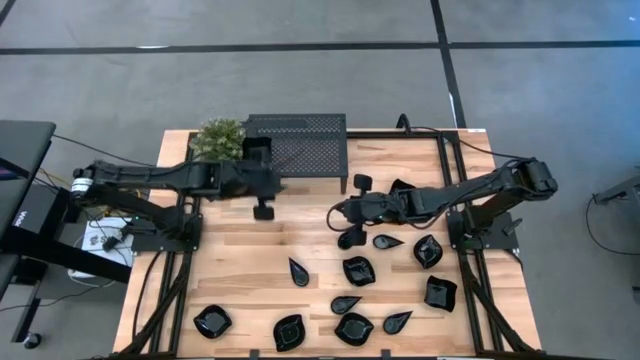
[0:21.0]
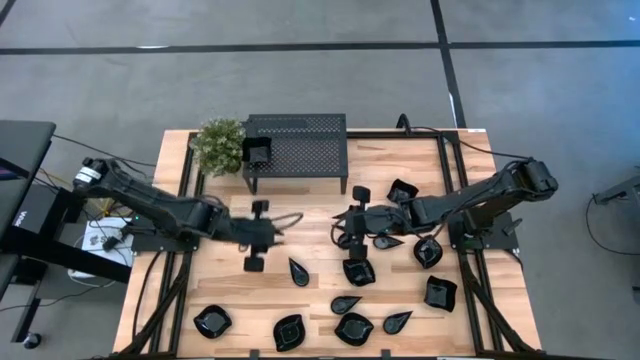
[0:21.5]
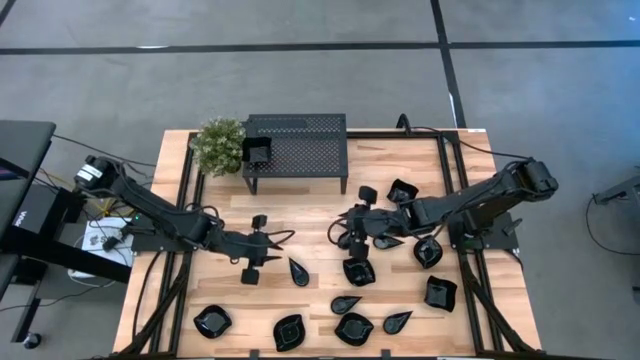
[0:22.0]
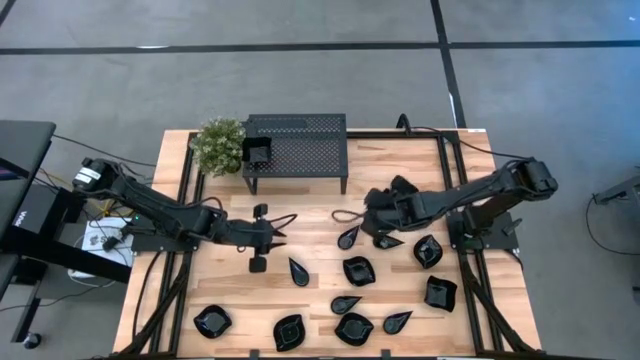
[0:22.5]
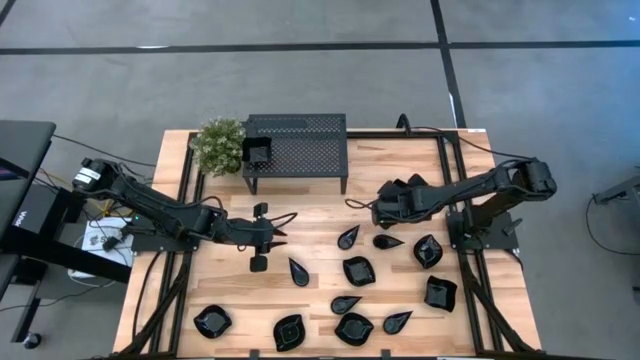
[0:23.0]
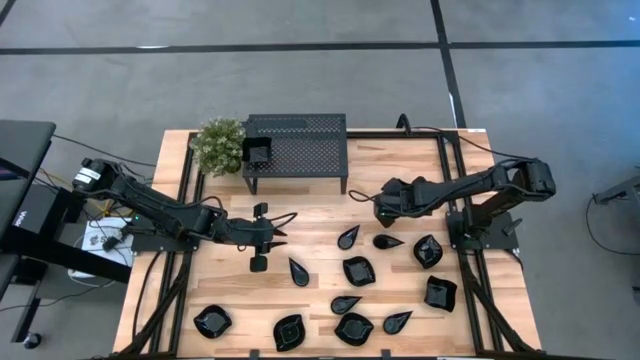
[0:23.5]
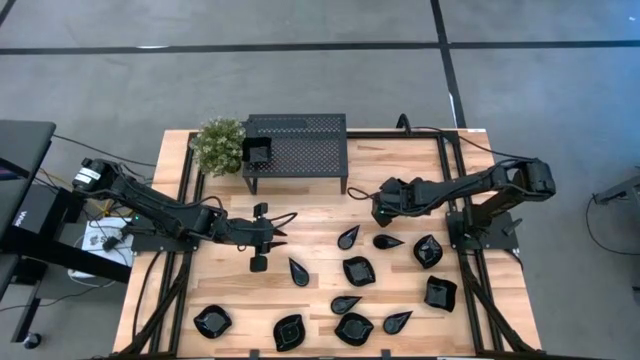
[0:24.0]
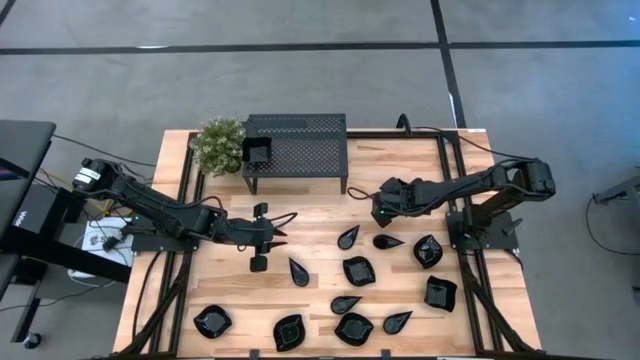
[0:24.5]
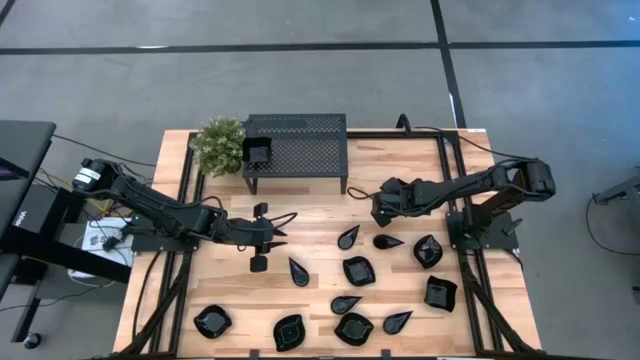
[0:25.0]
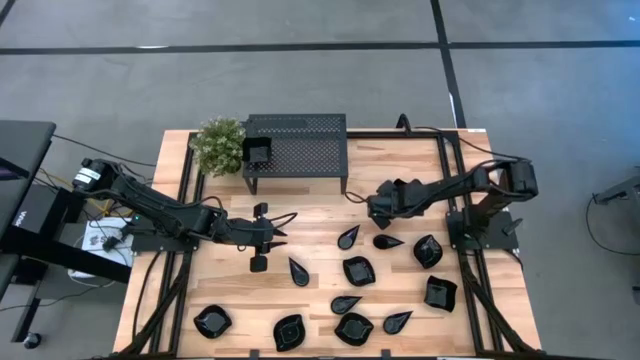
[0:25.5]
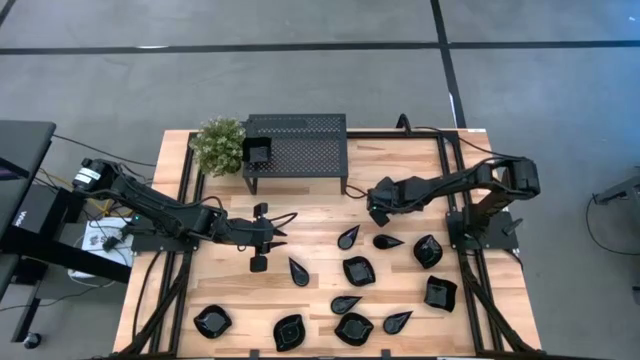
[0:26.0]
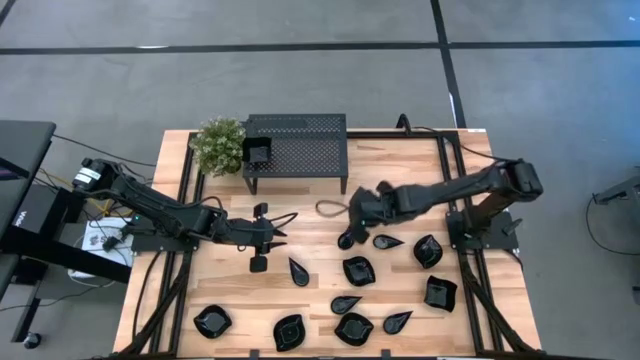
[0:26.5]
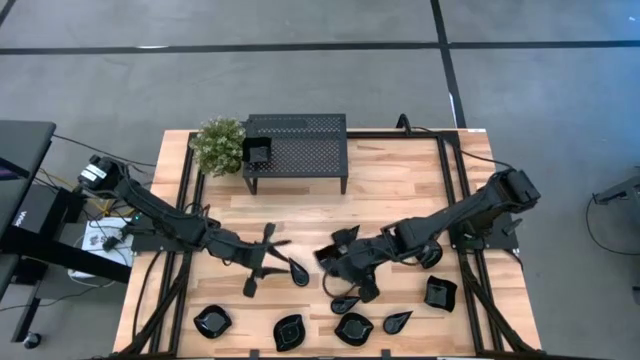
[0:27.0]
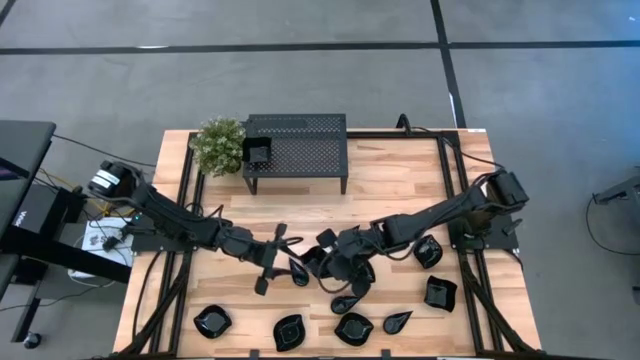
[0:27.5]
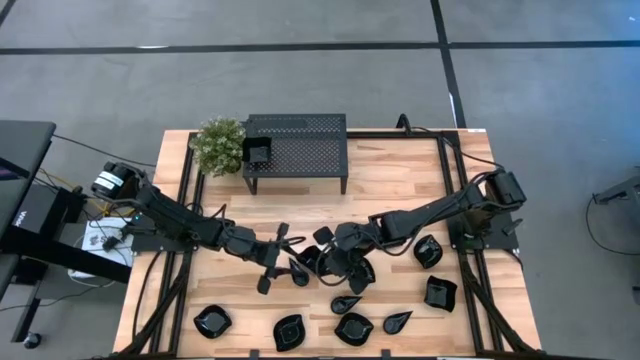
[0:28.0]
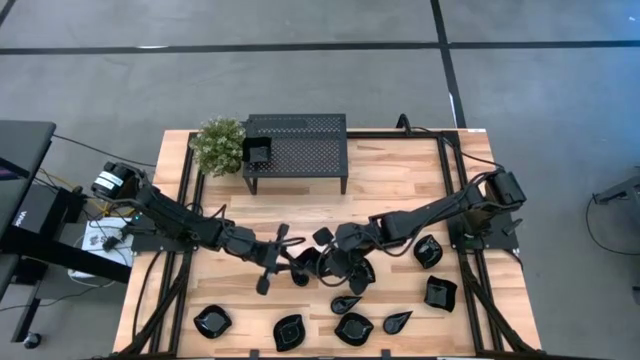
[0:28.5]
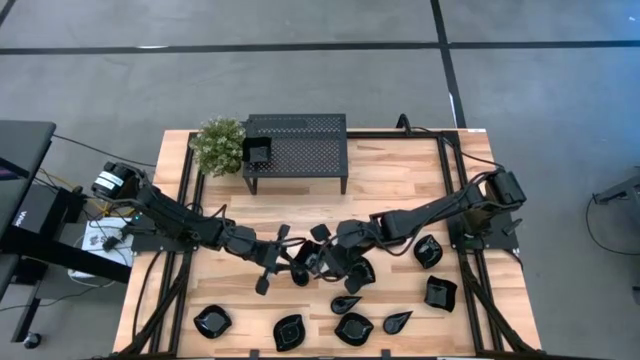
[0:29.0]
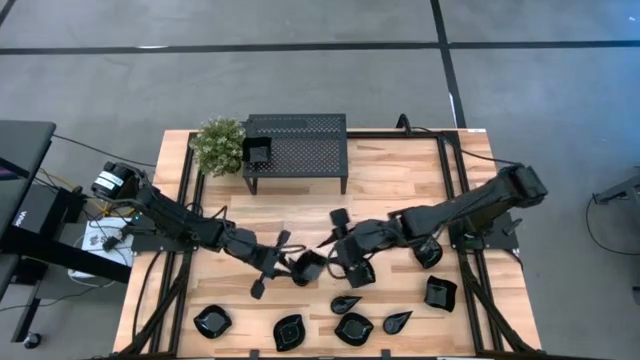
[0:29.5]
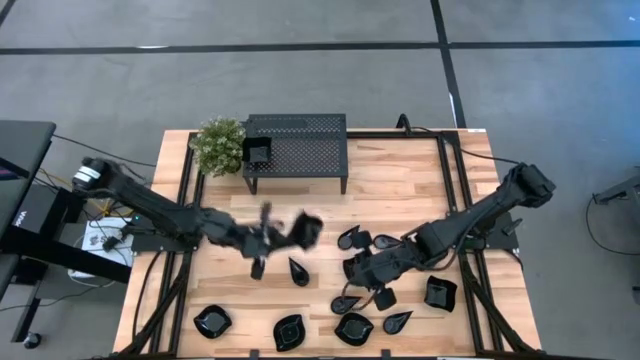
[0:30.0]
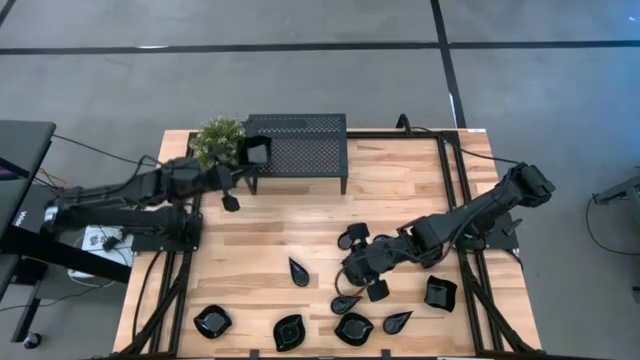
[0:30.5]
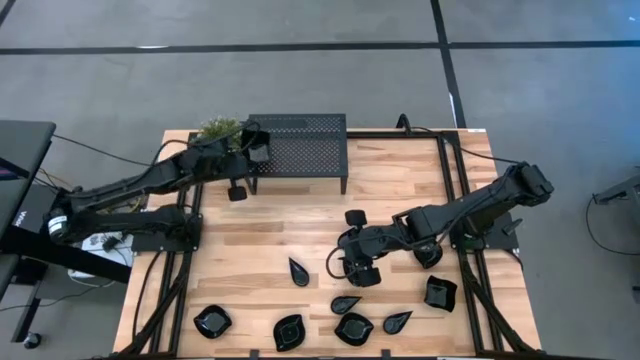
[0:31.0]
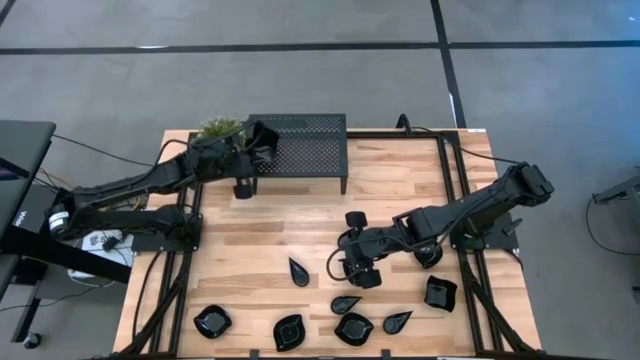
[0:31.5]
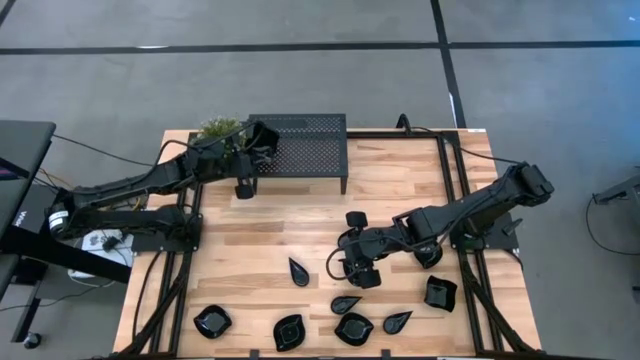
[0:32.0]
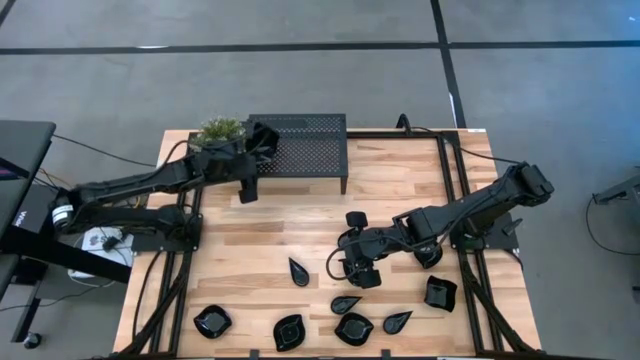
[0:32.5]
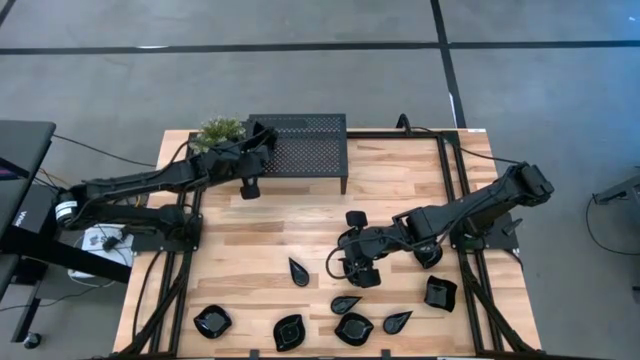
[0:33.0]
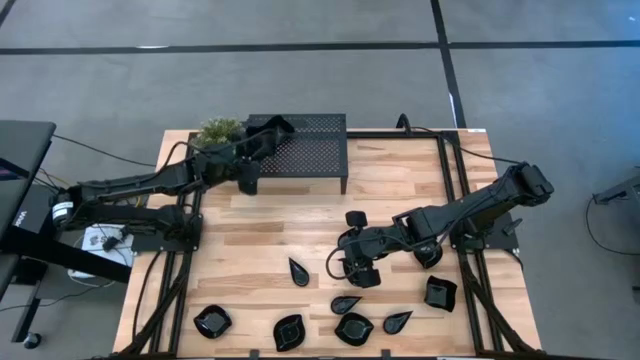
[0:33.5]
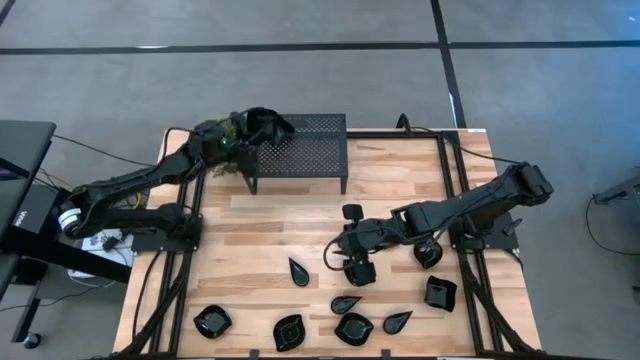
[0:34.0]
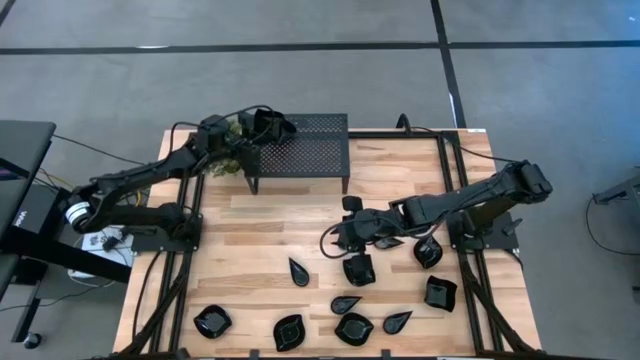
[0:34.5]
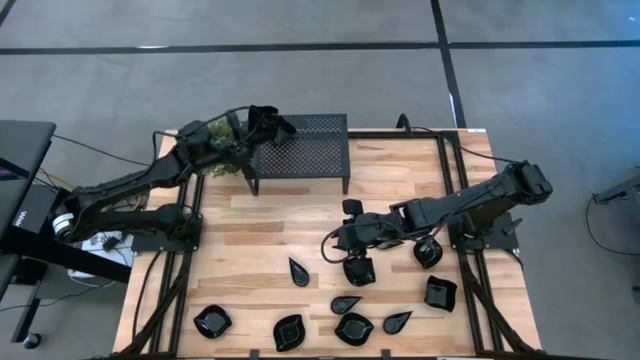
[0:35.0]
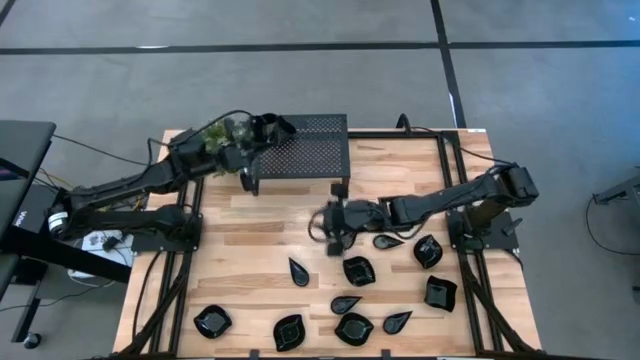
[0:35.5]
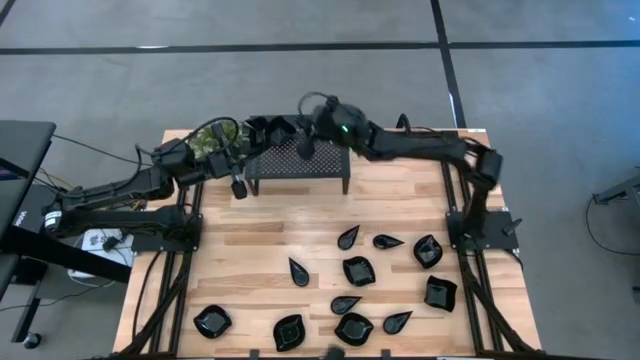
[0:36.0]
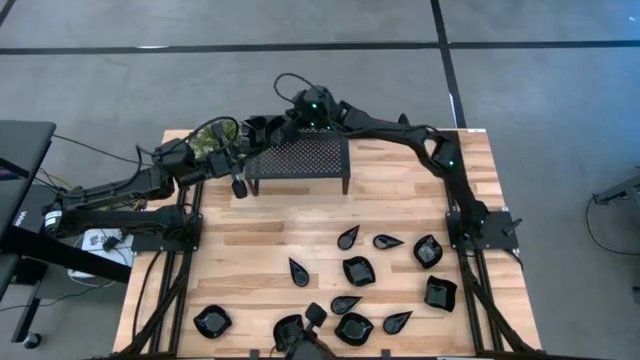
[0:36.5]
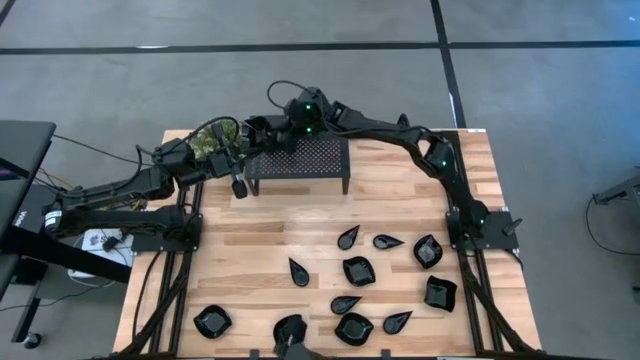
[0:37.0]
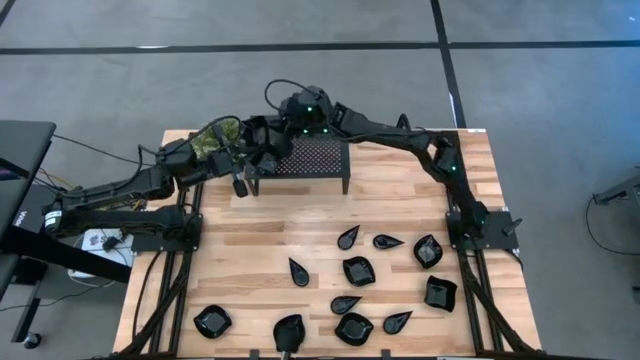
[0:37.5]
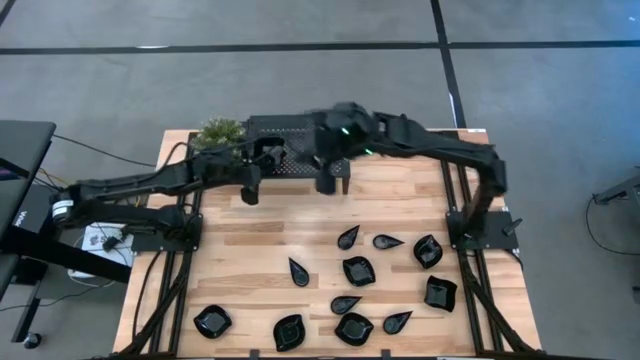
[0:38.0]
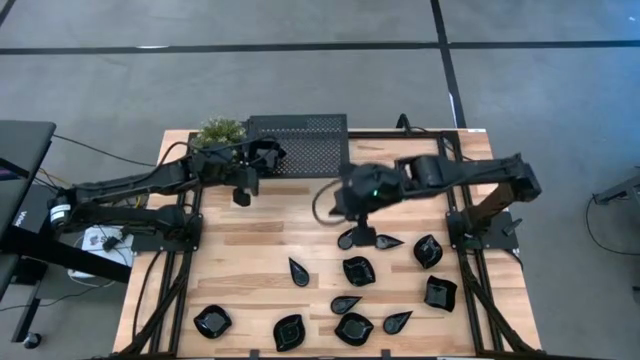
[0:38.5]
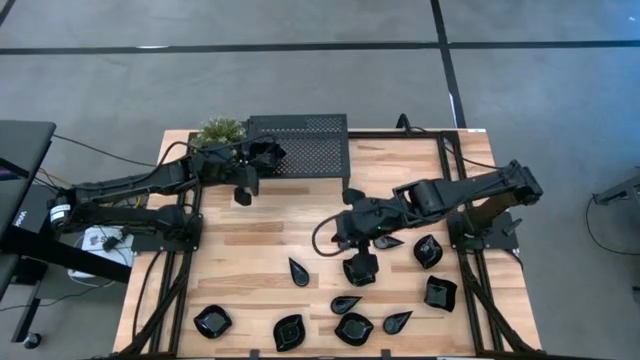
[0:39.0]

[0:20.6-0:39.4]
Task: Pick & Place Mini shaped plates
Stack the distorted square plate on top of the distorted square plate on the shelf

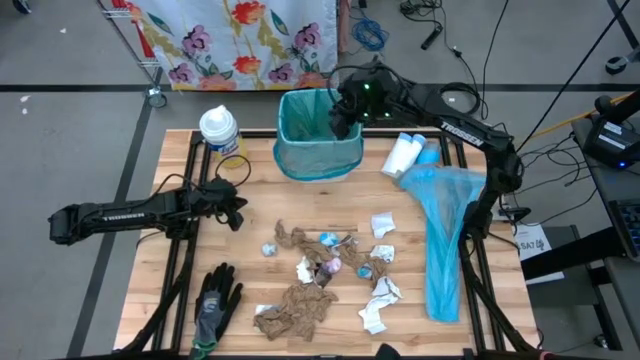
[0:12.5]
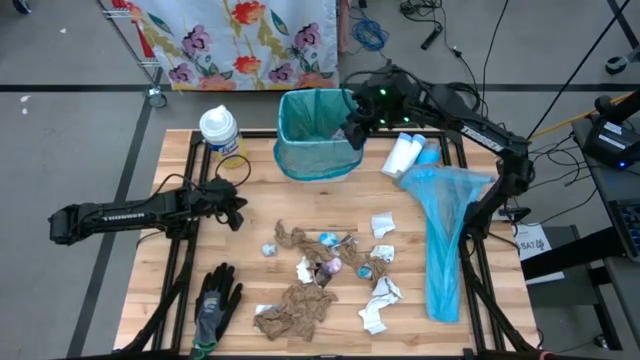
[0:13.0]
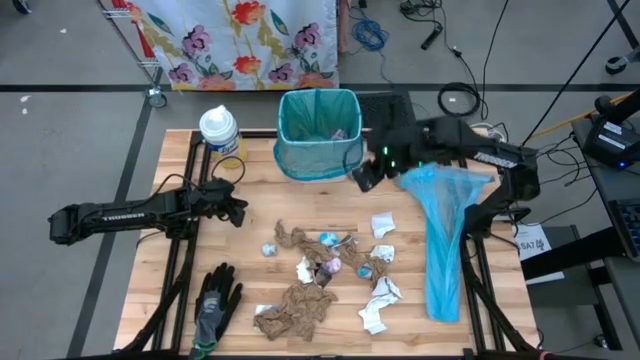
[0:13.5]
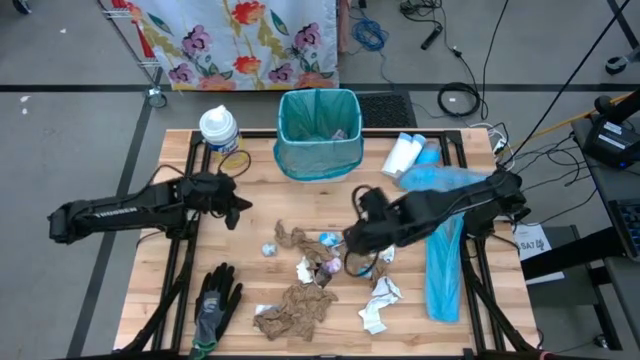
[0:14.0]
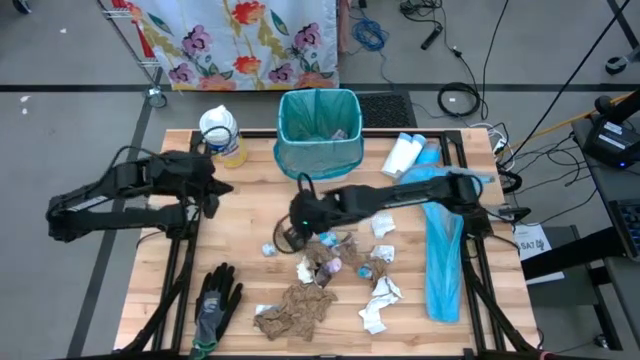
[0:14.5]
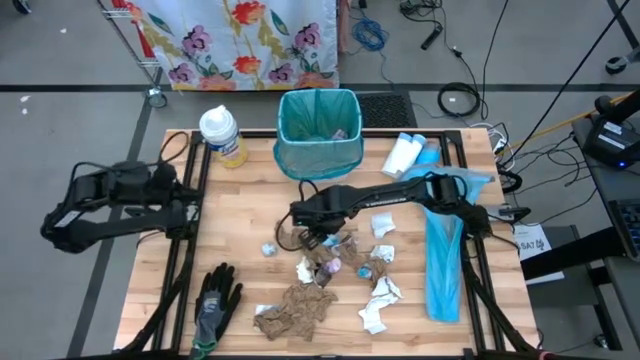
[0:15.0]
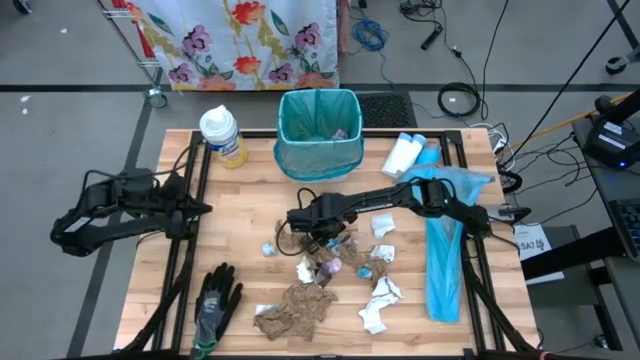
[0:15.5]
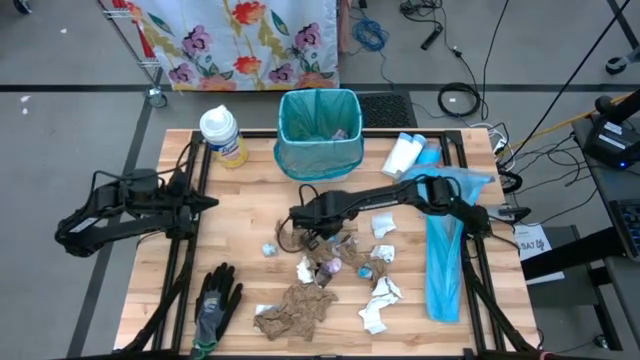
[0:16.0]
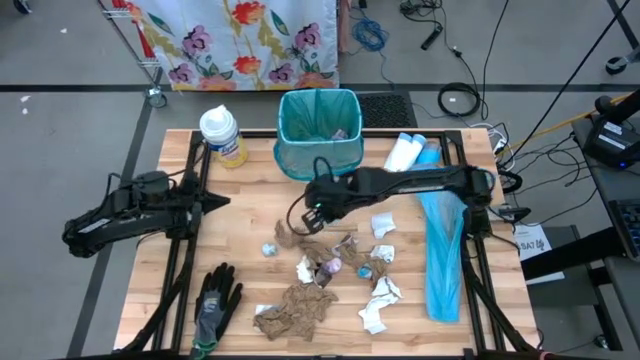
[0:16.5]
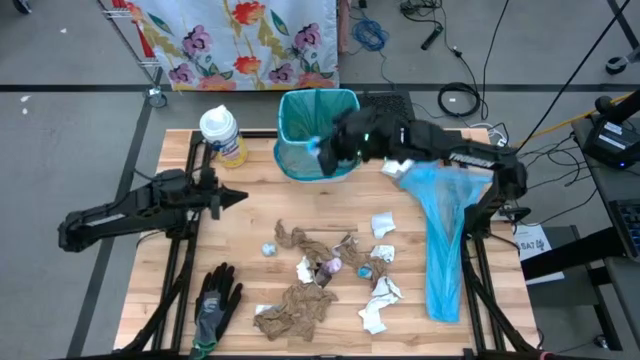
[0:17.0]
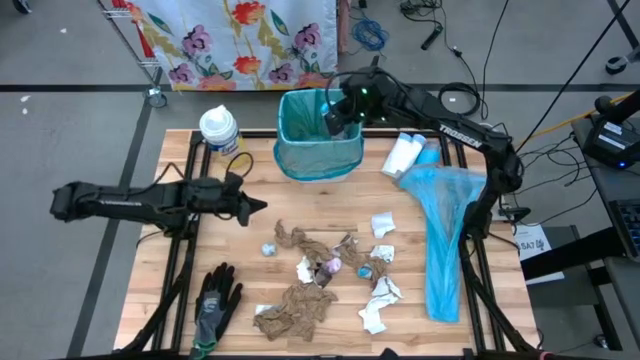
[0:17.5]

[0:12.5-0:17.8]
Task: place trash/remove bag and relplace
Put the blue bag into the white trash bin
